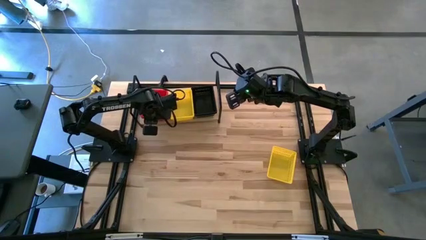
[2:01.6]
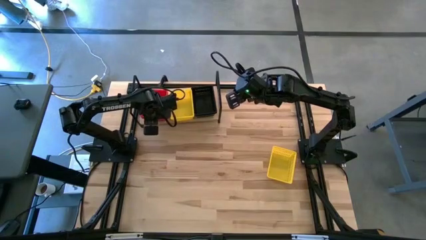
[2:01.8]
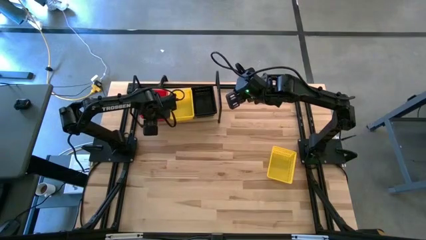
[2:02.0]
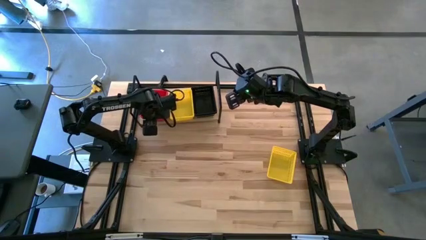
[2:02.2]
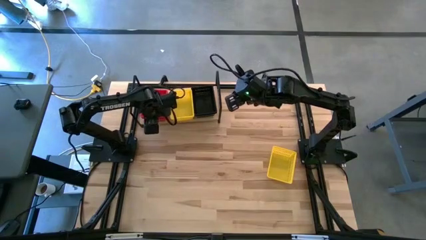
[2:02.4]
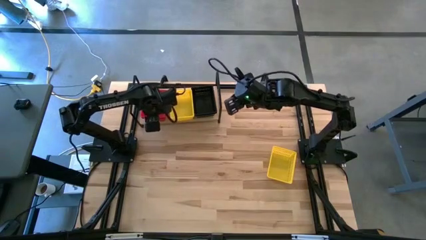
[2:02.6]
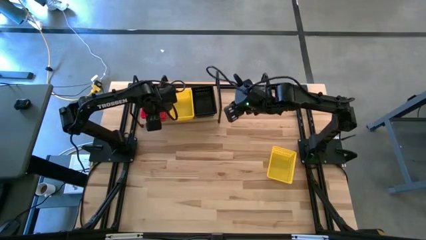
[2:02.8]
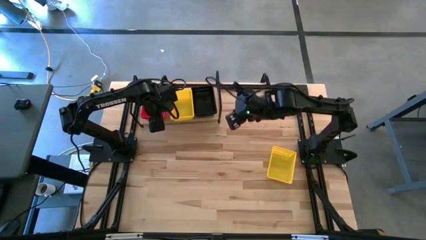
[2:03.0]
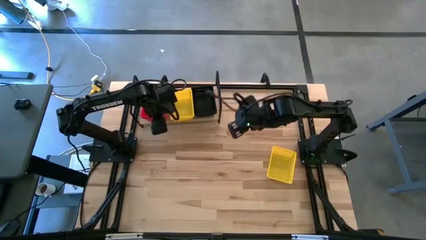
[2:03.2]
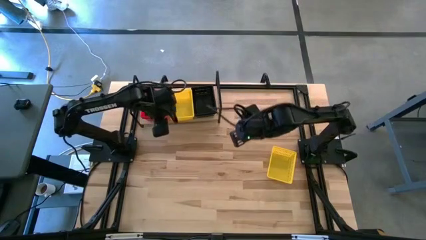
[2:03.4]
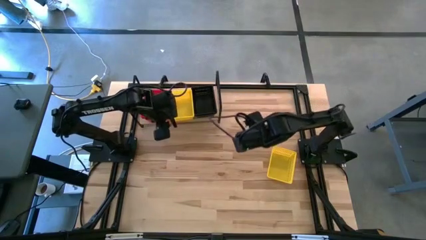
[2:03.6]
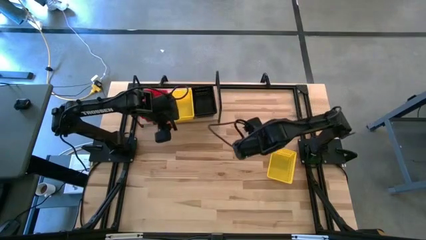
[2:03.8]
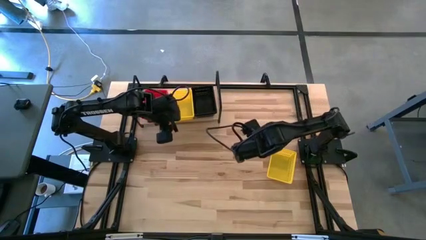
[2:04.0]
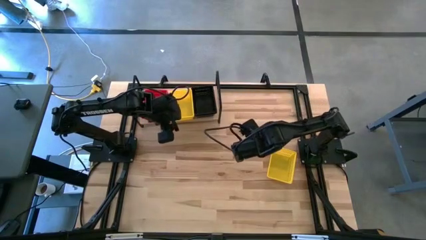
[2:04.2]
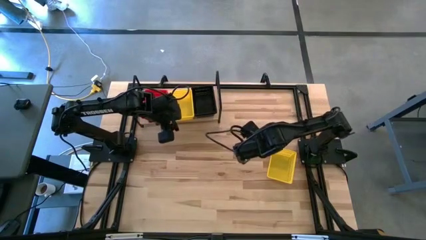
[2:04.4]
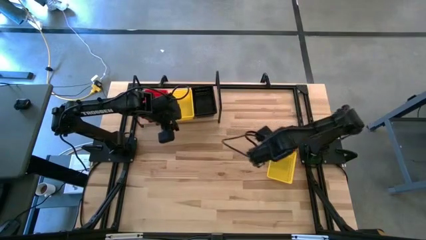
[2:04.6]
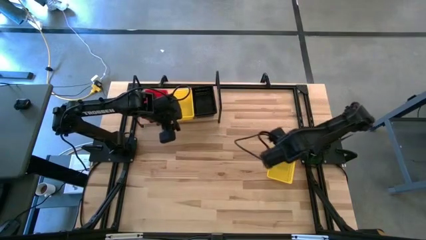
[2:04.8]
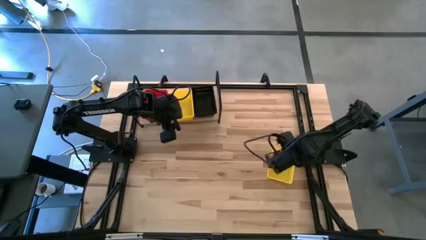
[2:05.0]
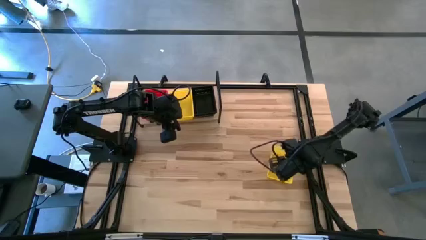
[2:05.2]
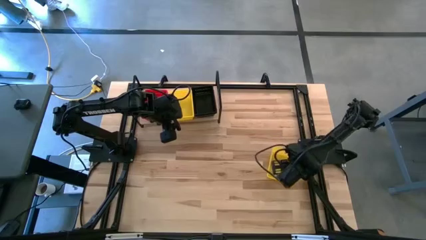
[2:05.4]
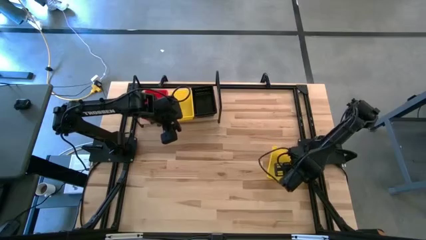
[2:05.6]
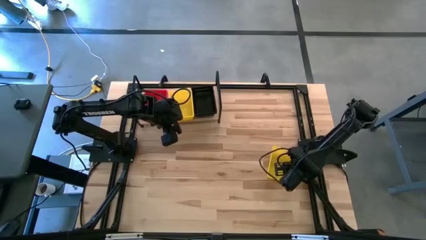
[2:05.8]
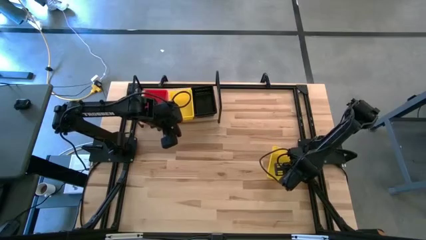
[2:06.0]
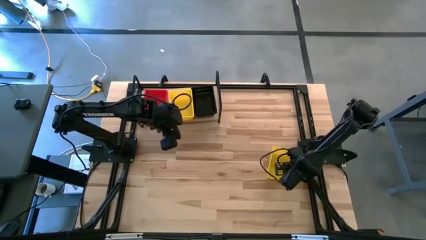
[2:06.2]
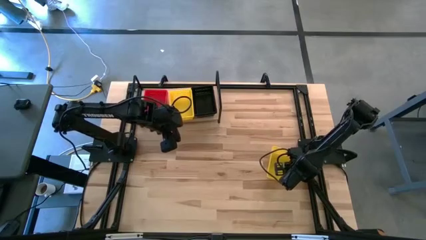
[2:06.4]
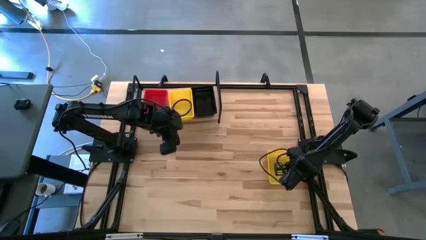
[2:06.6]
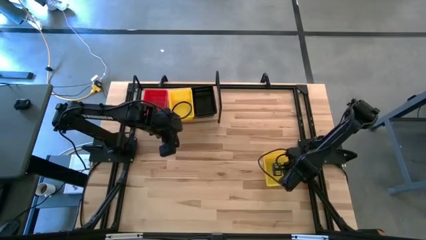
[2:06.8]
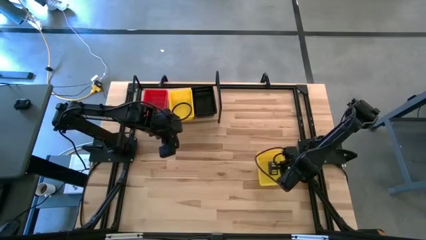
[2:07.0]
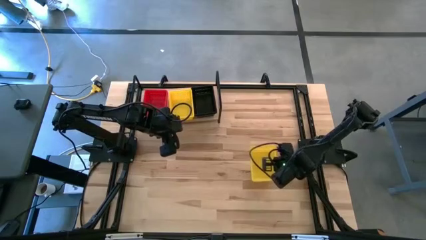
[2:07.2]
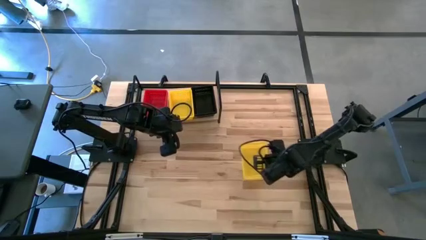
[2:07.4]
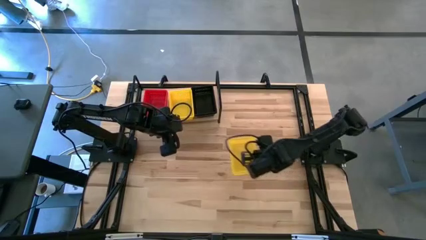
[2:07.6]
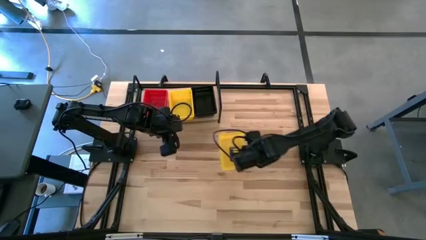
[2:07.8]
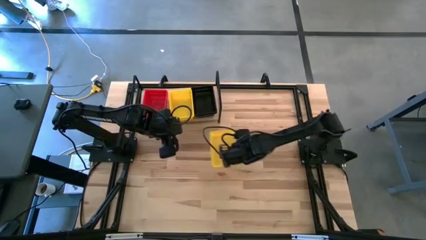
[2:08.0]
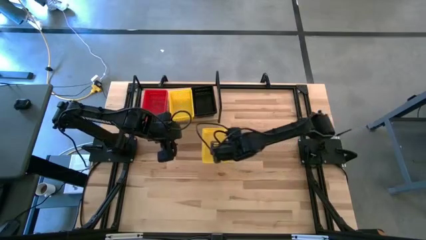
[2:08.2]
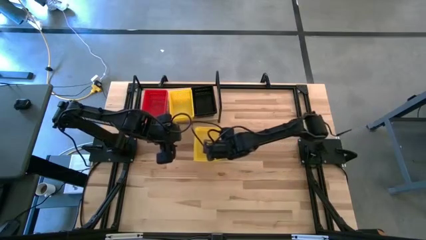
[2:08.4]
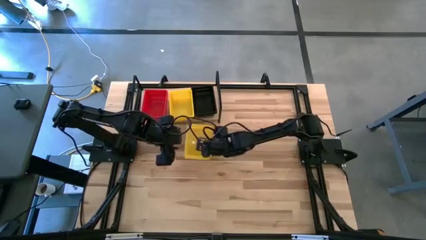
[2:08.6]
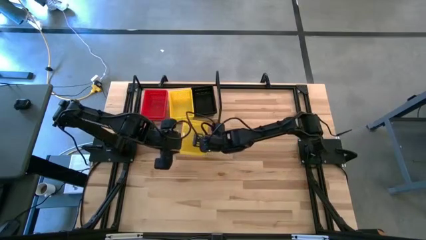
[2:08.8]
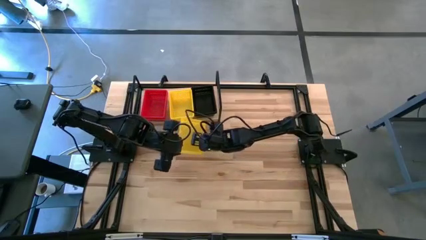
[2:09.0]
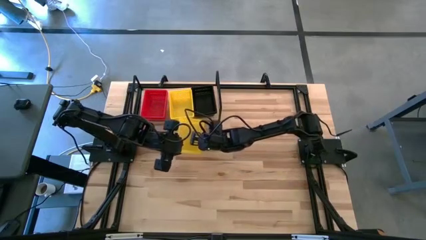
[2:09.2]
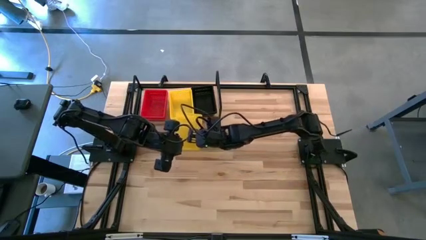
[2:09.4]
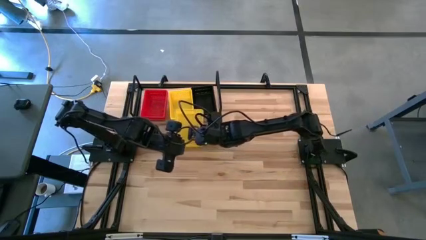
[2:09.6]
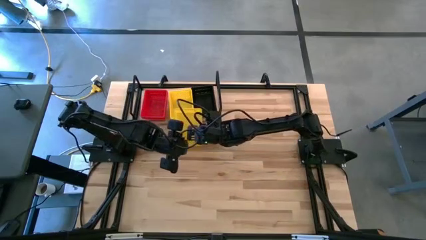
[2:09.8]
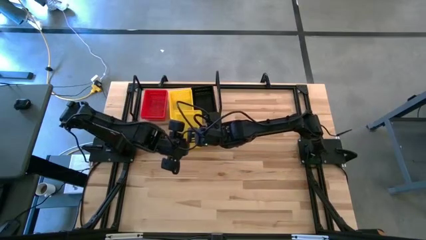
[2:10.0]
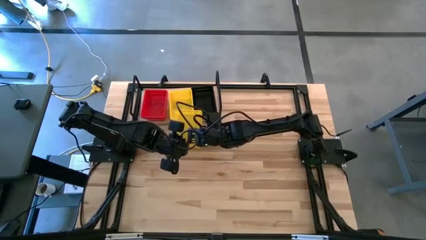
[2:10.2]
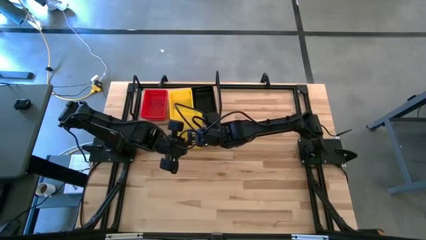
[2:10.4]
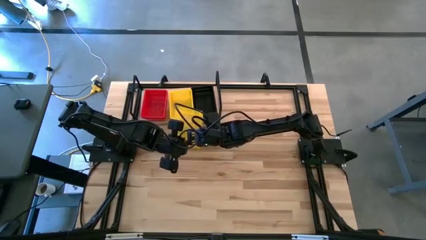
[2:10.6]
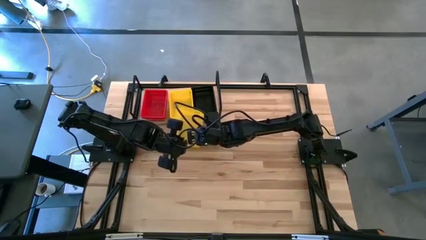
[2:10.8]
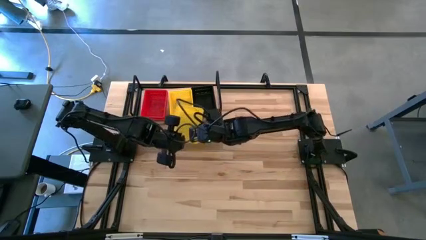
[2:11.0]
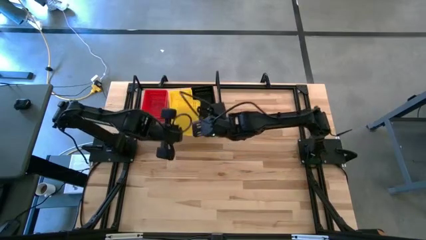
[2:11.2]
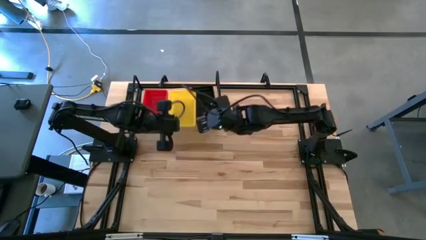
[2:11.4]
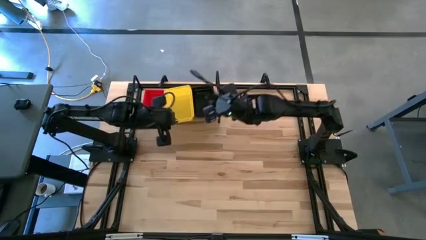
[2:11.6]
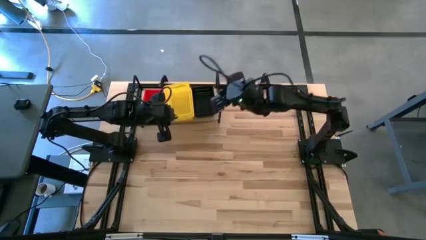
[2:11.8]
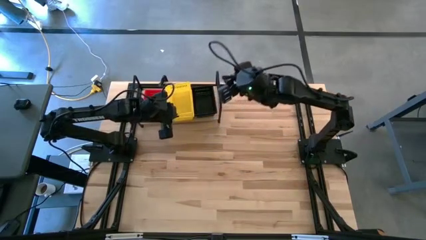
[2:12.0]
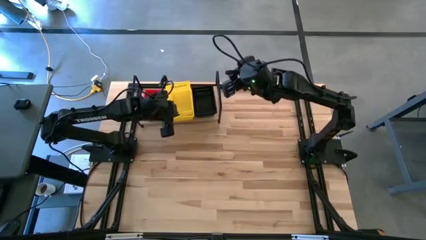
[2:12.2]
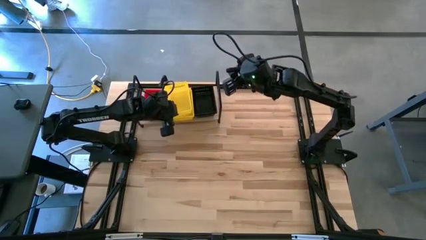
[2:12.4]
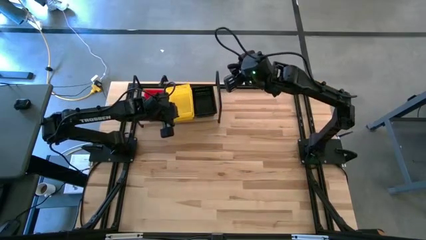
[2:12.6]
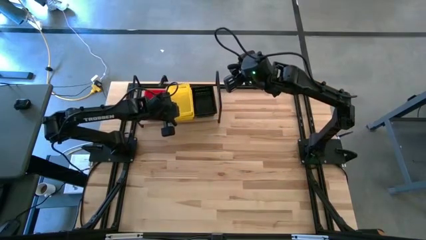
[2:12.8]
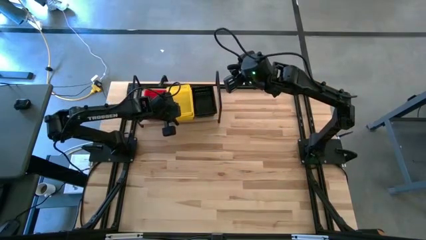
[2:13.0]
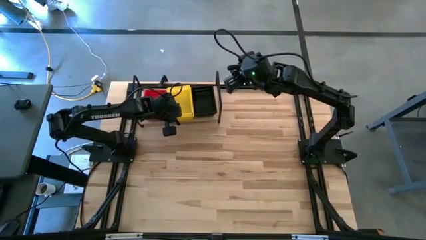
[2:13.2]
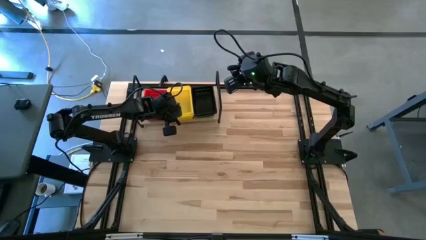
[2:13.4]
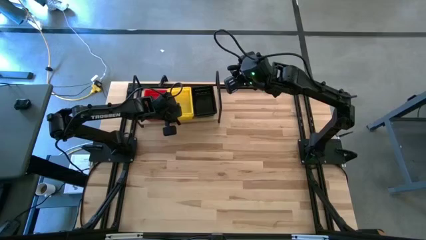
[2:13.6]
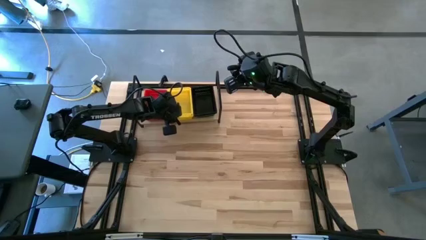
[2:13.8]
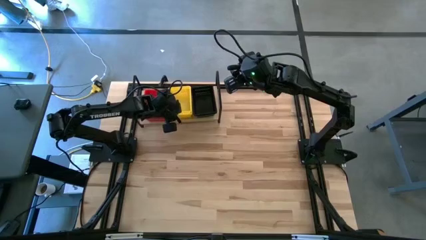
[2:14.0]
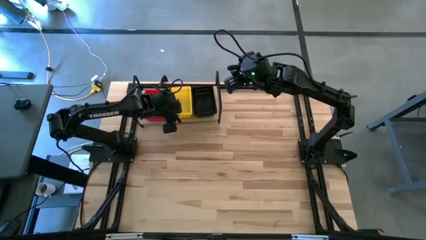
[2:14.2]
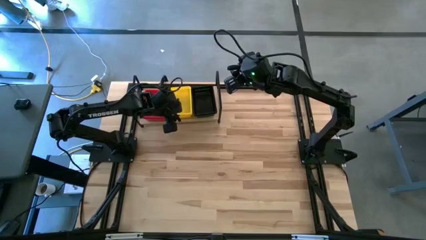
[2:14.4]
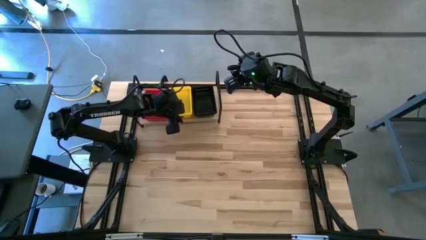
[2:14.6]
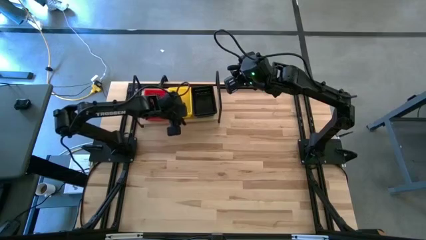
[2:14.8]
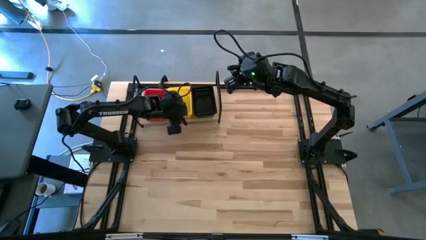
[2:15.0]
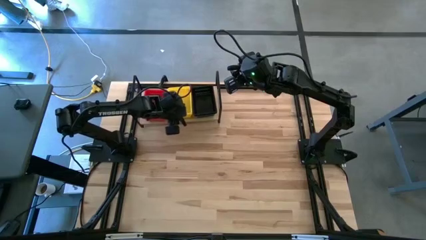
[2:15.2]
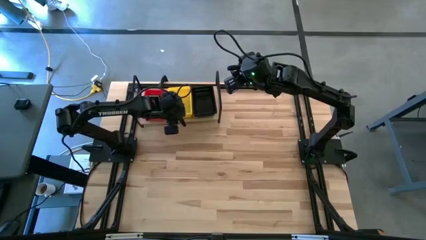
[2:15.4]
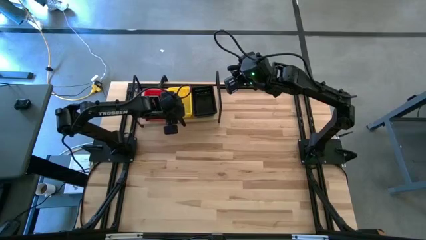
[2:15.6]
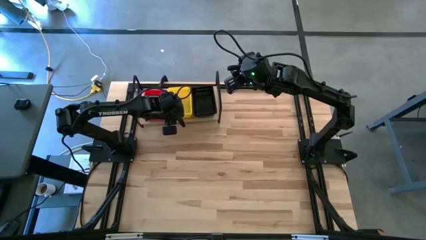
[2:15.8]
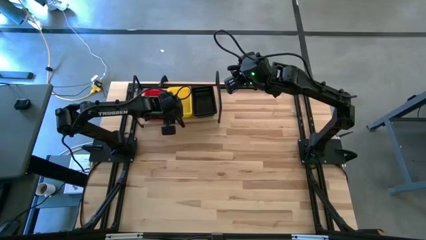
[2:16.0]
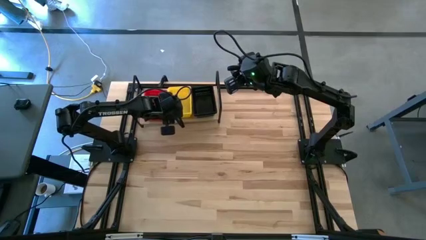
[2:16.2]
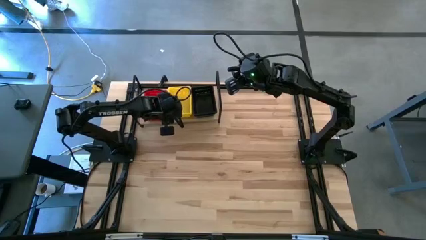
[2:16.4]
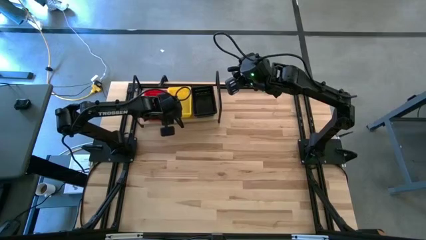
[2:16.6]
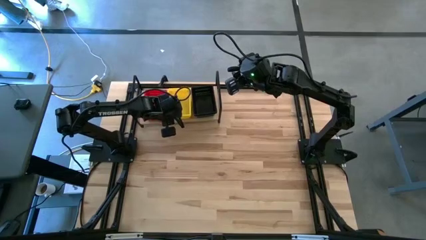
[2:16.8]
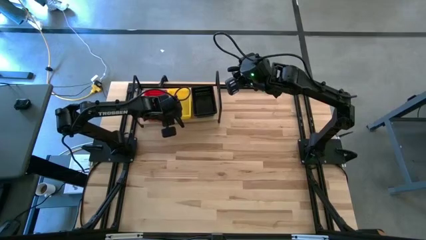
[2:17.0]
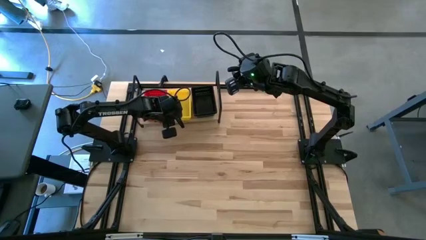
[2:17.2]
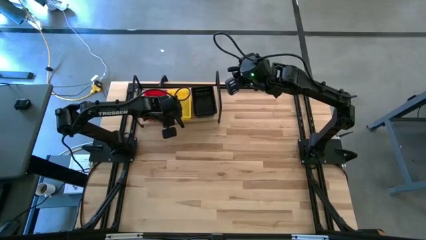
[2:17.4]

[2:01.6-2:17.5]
Task: Stack baskets on shelf by color
Stack the yellow bin on top of the yellow bin on the shelf

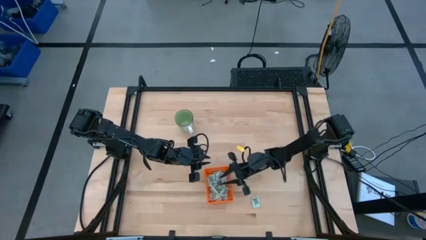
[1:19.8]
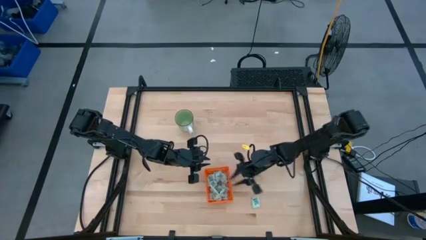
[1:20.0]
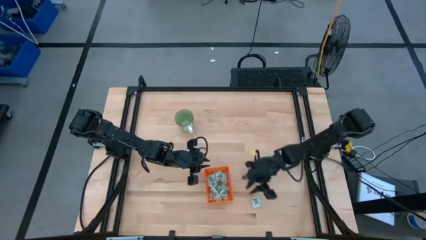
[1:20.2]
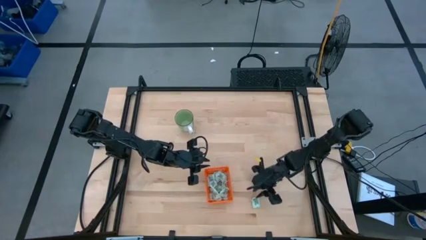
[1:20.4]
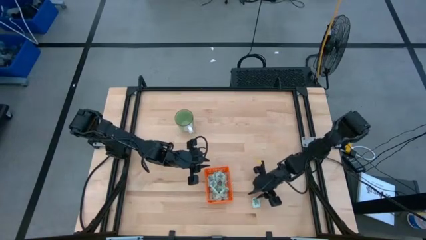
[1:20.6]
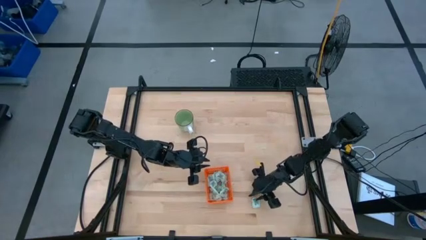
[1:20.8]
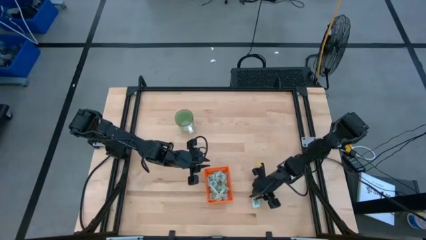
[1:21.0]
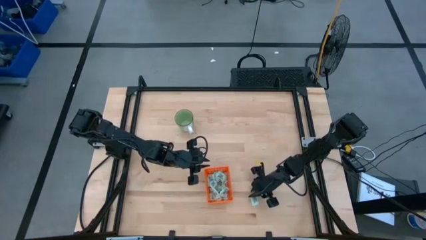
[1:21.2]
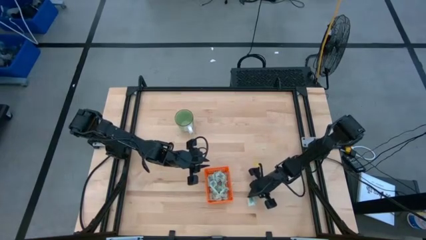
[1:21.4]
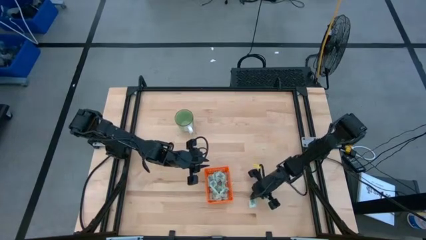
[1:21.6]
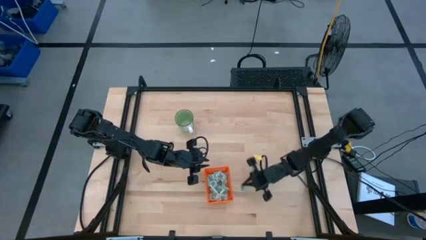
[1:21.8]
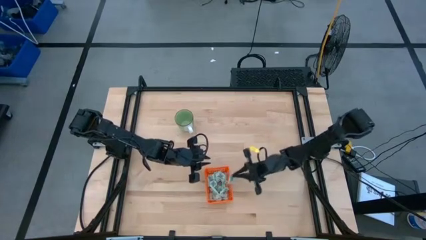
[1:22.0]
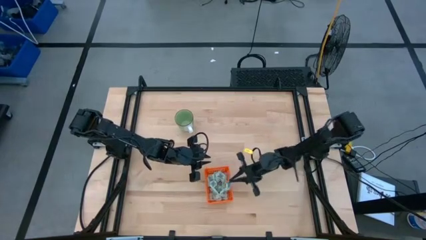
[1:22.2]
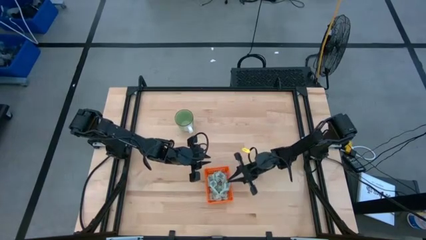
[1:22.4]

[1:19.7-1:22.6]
Task: Pick and place Stevia / Truvia into bins
Put the stevia packet into the orange basket
